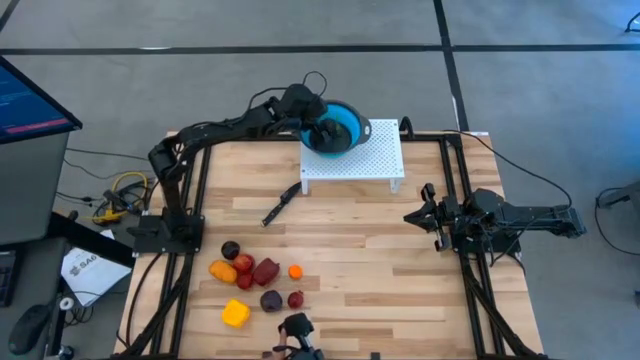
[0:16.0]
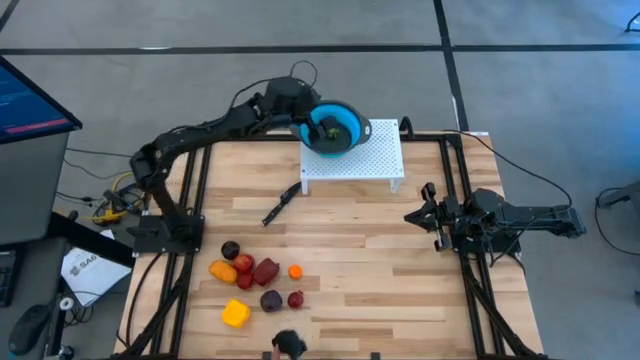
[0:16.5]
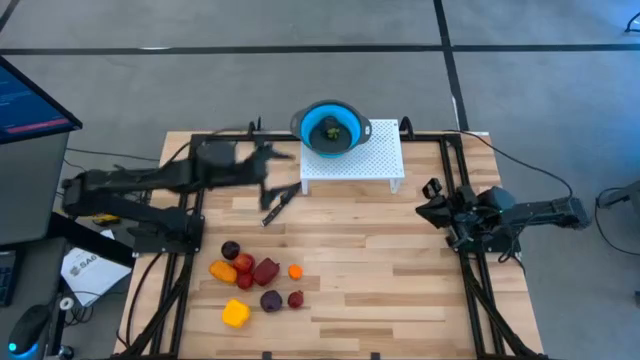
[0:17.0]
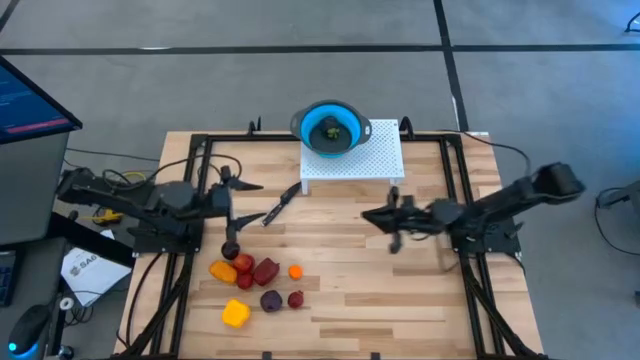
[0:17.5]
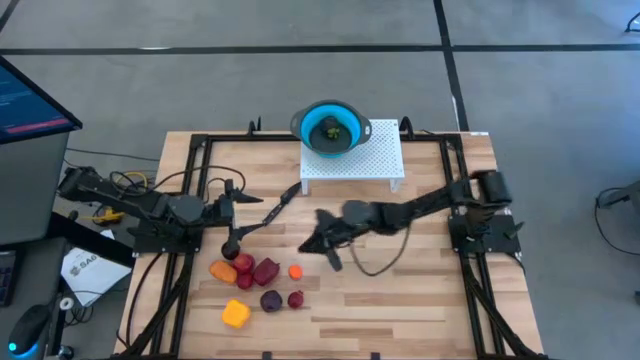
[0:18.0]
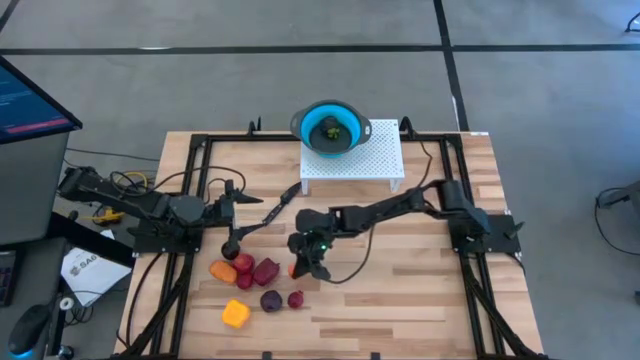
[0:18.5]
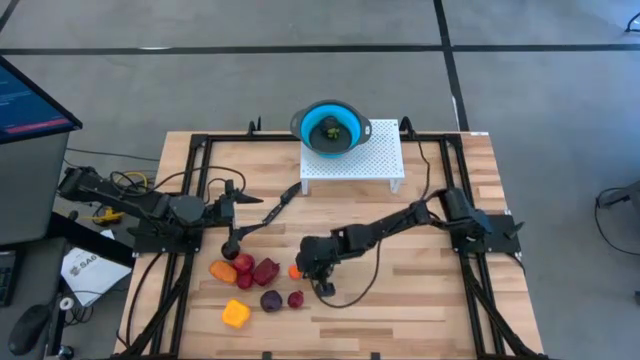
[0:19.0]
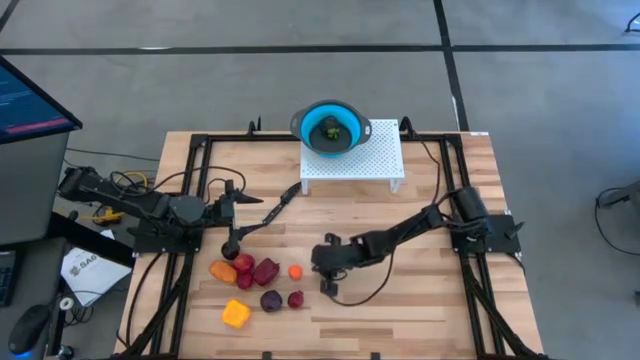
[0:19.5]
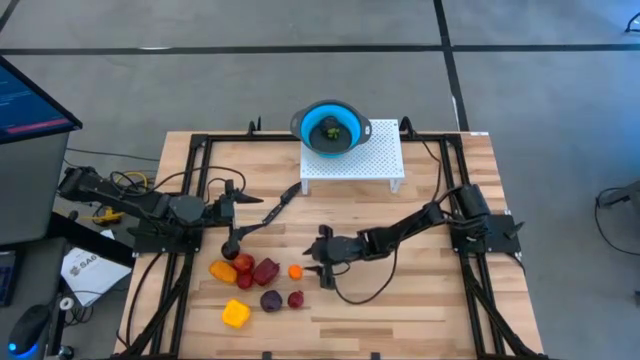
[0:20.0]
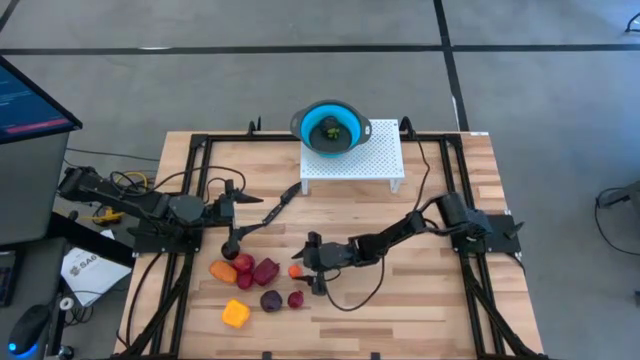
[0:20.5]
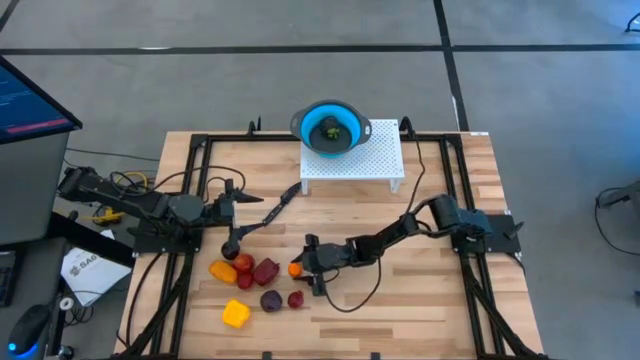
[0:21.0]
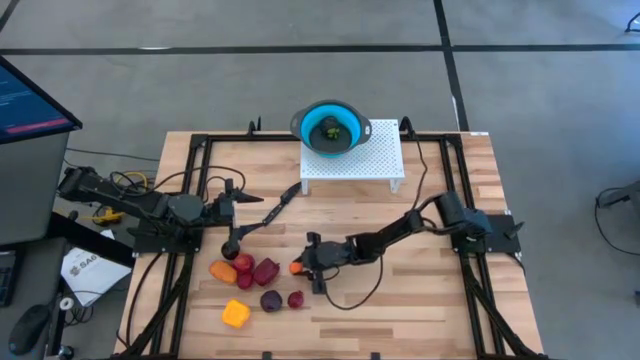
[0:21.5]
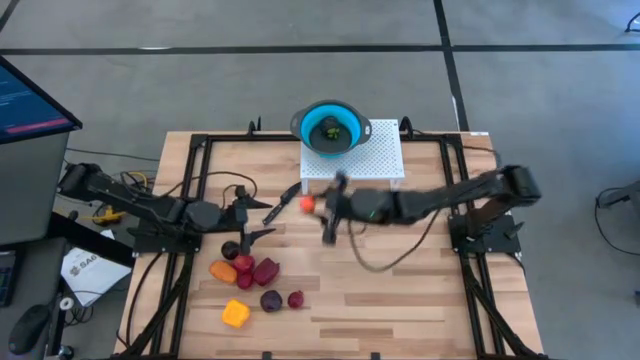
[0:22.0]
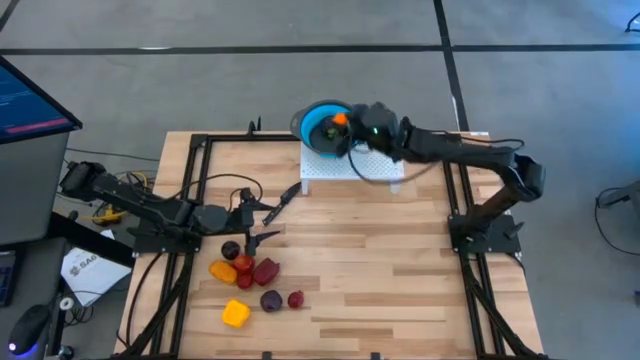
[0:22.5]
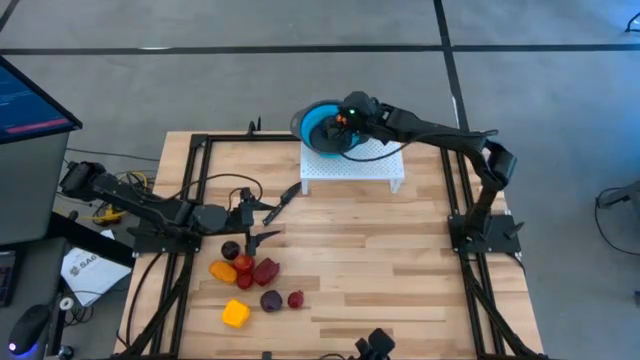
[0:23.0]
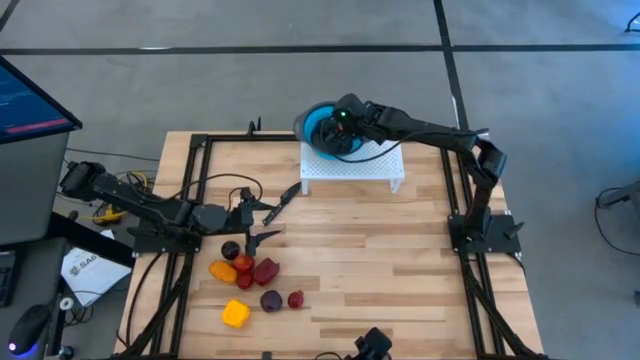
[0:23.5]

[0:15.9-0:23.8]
Task: Pick & Place Fruit
Put the orange into the blue strainer bowl on the shelf

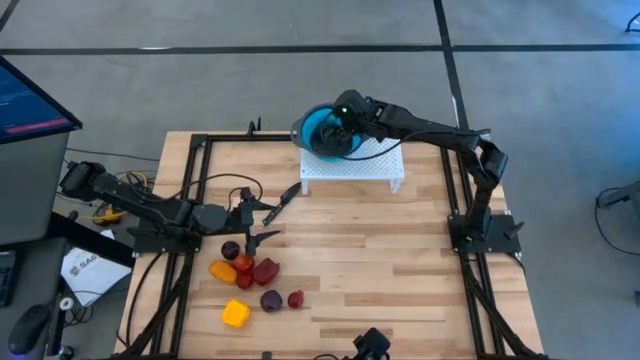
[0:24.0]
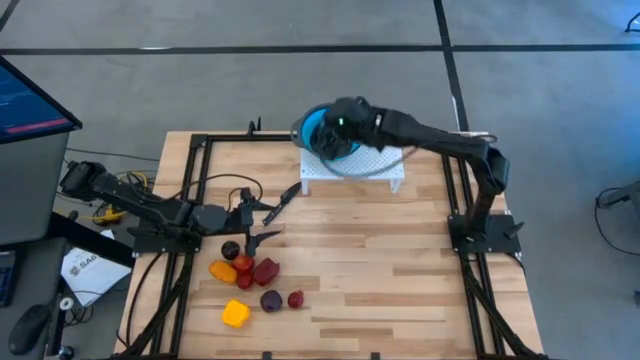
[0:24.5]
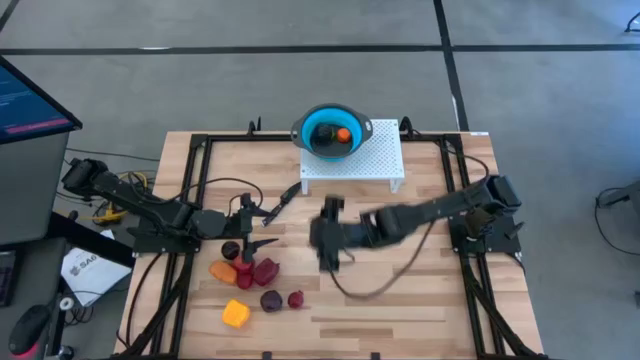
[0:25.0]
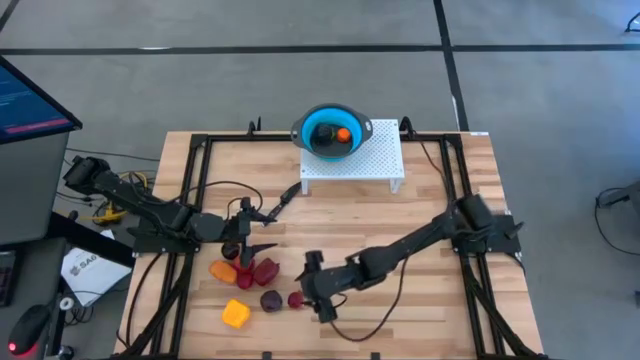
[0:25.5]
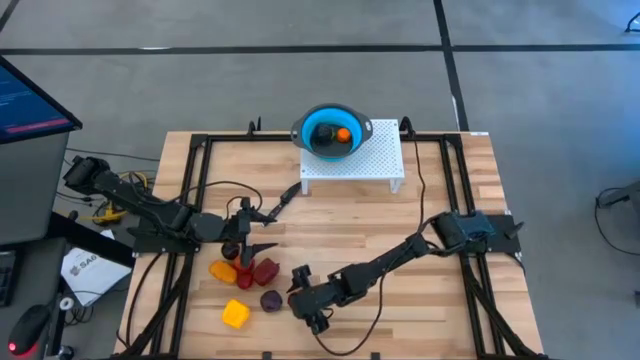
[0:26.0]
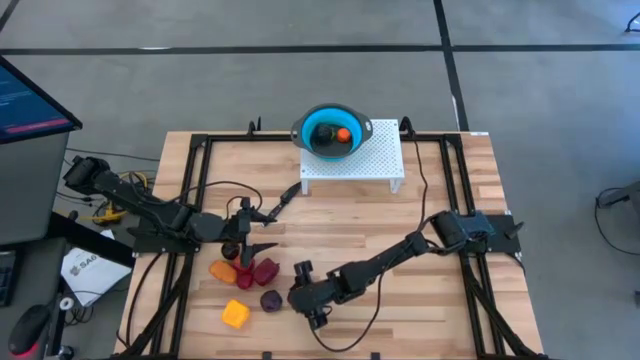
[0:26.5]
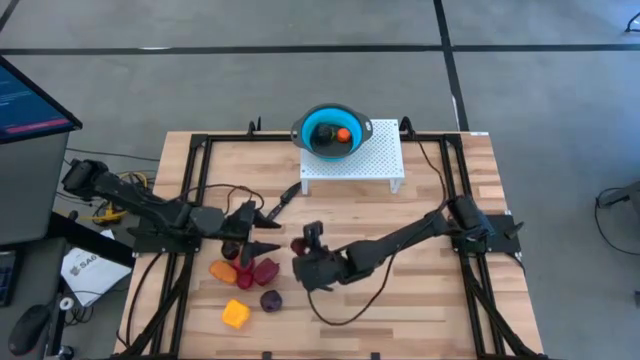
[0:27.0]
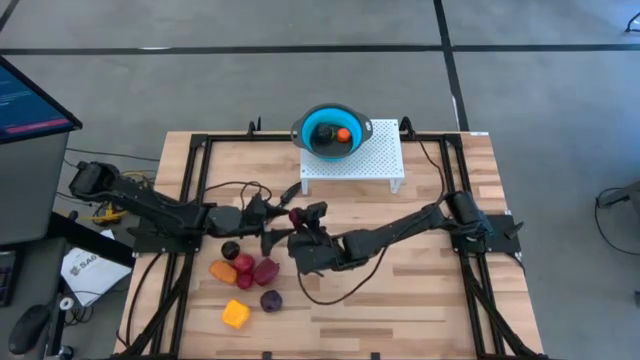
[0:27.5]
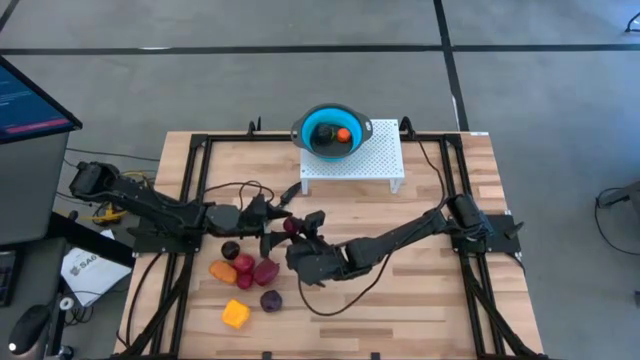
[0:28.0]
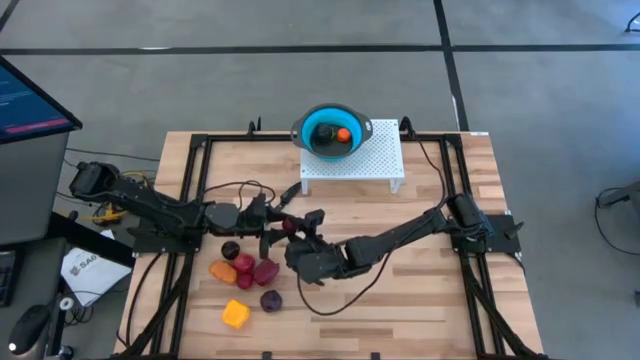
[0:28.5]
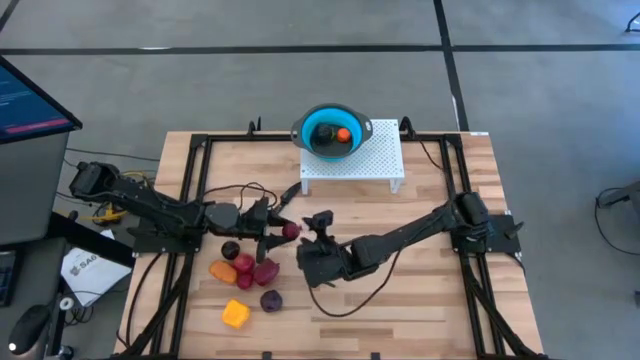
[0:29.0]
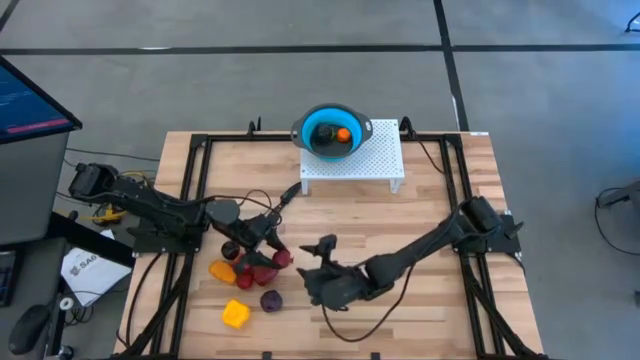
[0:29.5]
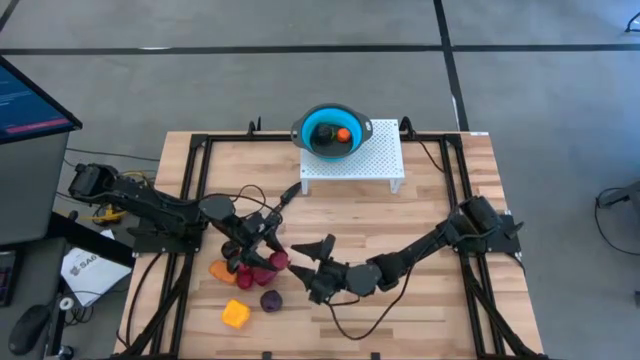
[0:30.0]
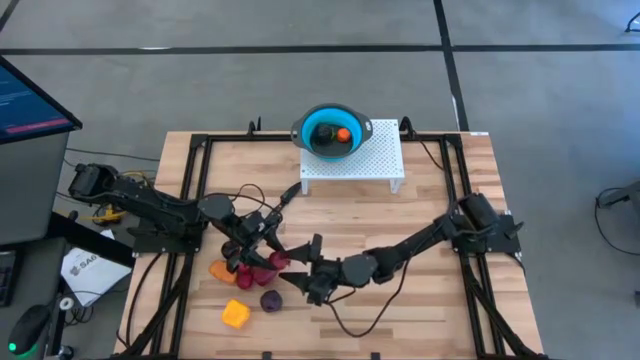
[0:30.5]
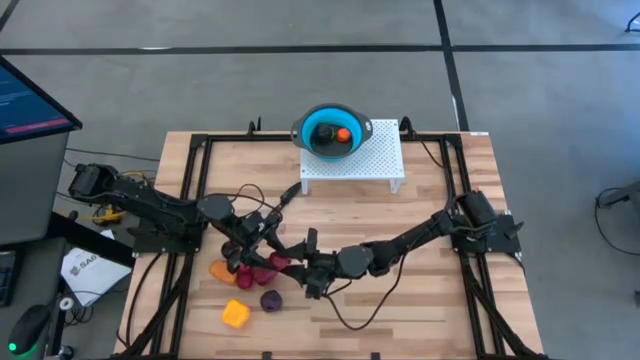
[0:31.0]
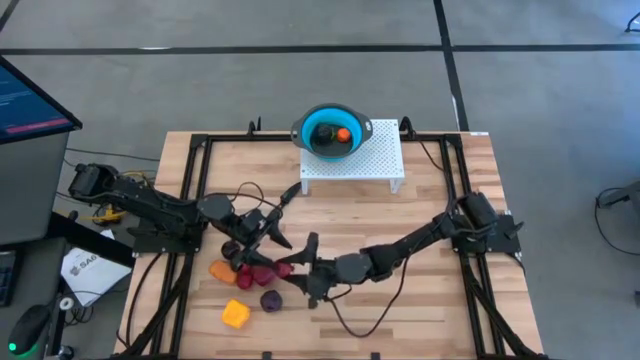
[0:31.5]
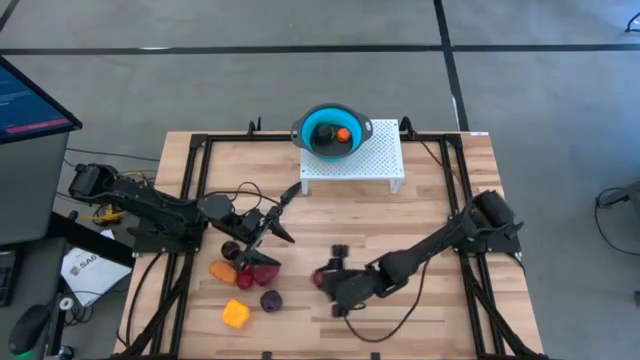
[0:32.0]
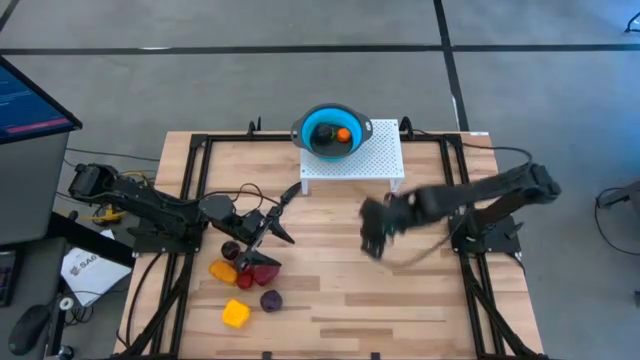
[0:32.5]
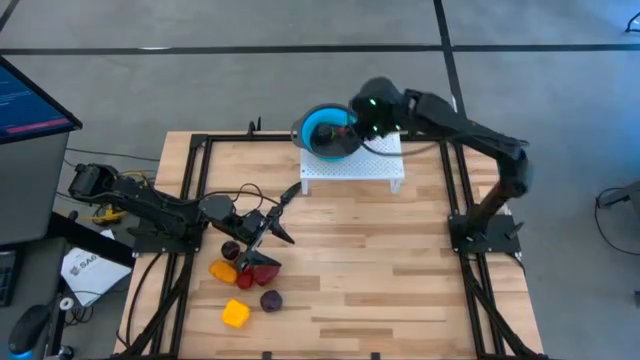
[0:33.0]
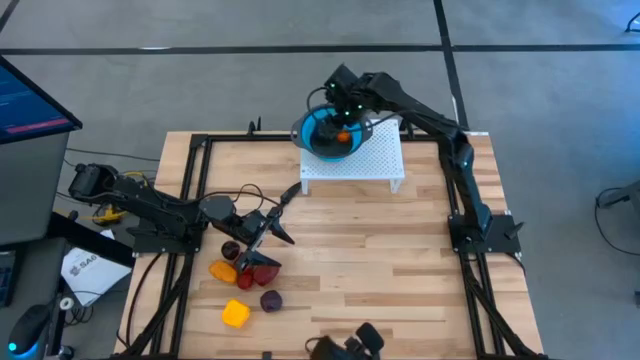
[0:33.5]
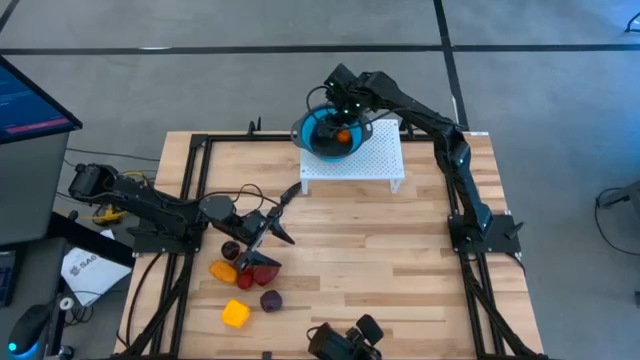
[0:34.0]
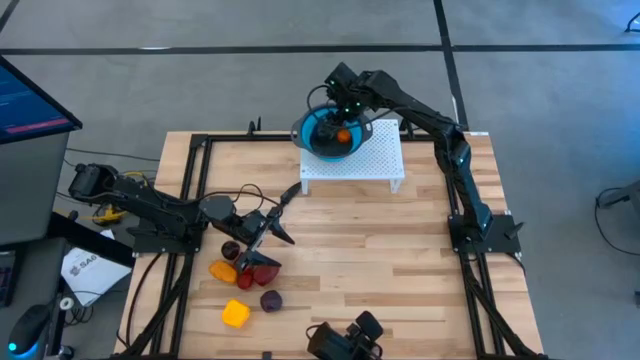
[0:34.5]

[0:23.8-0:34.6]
Put the red pomegranate into the blue strainer bowl on the shelf

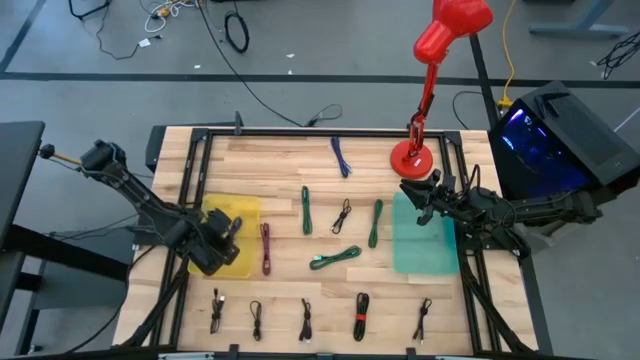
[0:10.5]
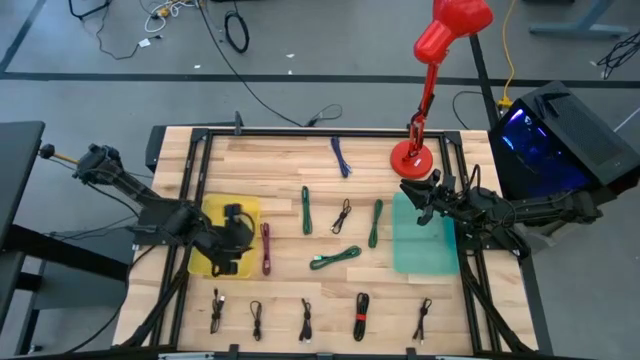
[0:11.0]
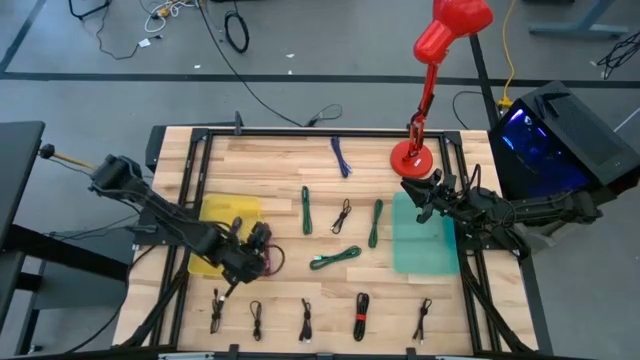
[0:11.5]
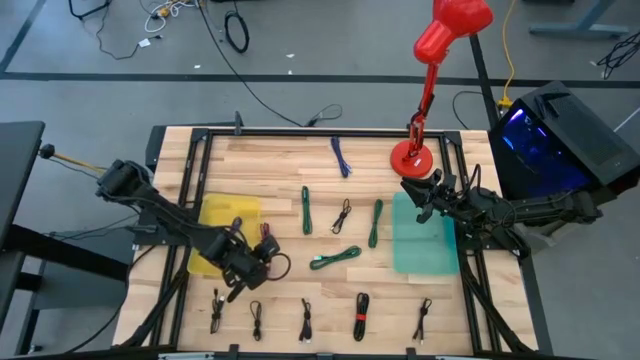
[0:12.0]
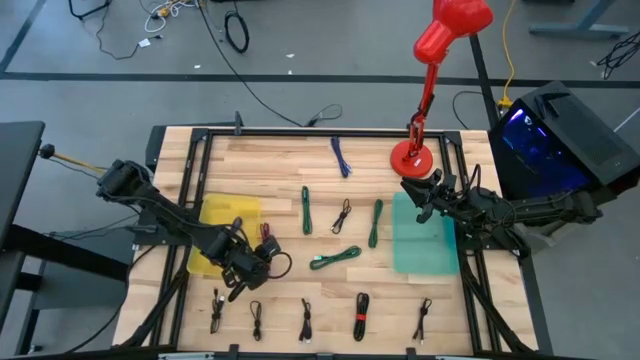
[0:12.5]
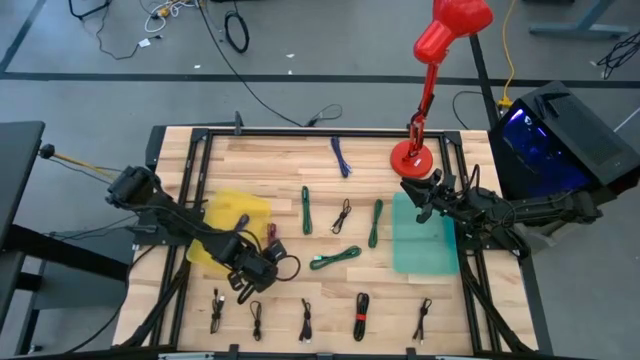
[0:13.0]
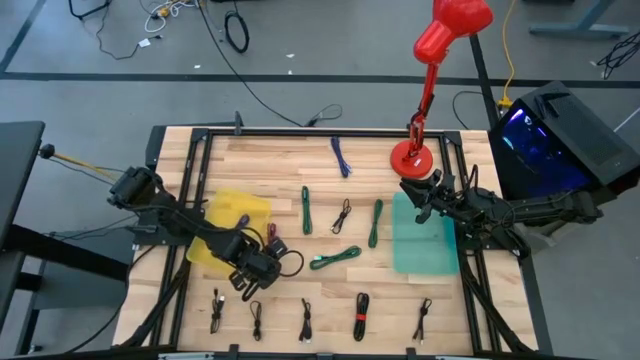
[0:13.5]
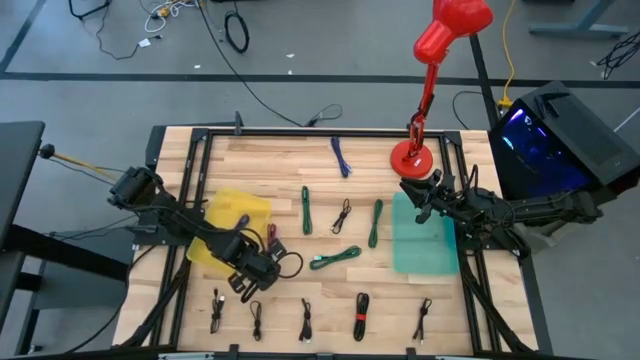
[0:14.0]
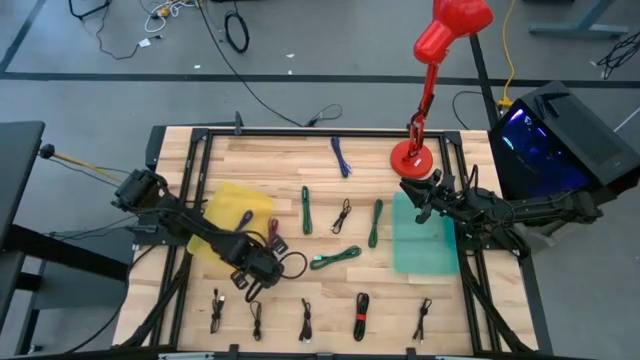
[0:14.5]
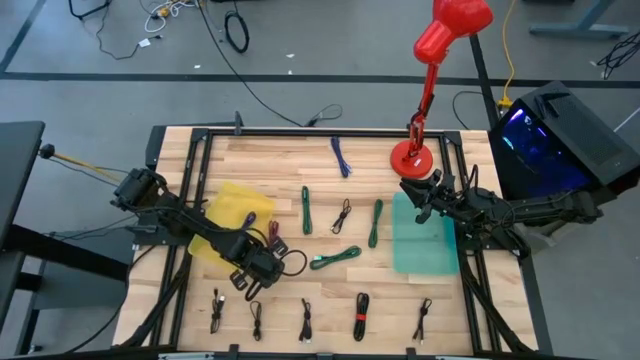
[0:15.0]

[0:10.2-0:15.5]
Task: Pick & Place USB Port
Put the black and pink charger cable into the yellow bin
